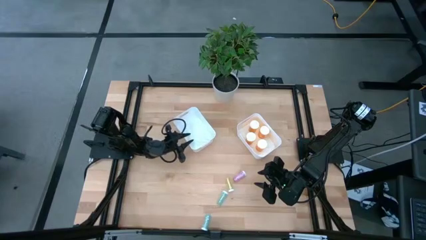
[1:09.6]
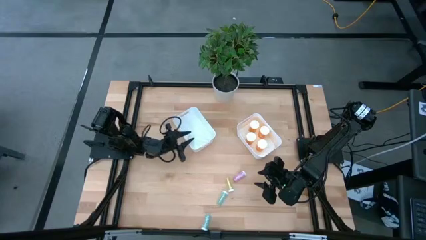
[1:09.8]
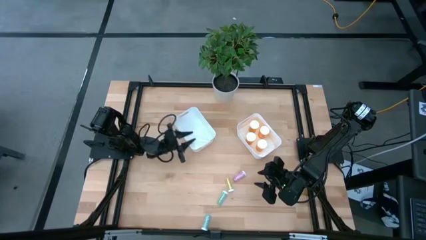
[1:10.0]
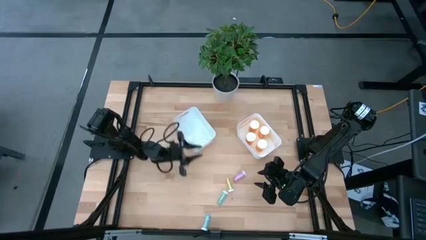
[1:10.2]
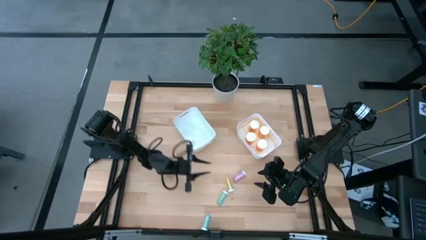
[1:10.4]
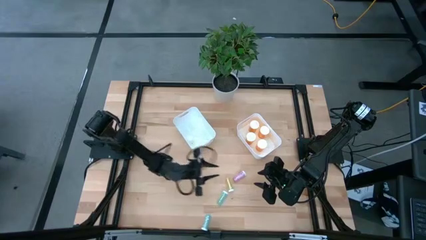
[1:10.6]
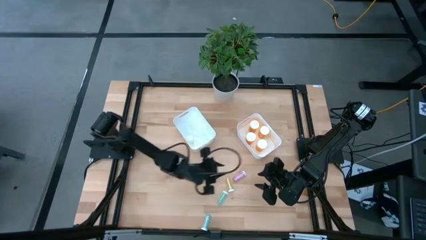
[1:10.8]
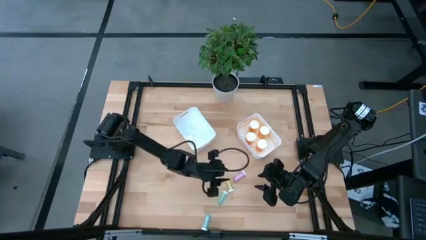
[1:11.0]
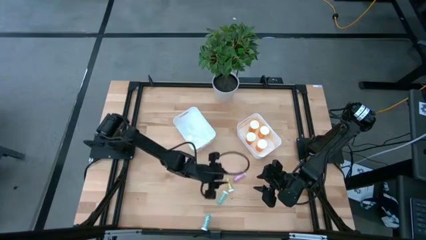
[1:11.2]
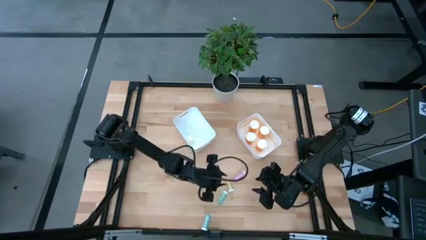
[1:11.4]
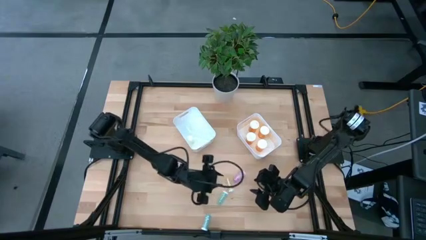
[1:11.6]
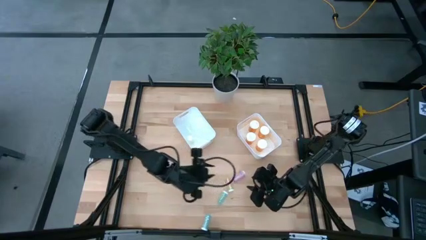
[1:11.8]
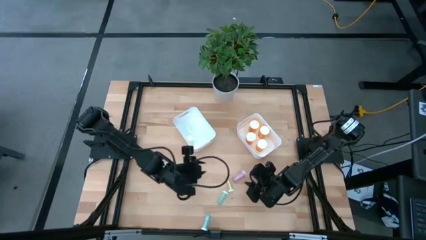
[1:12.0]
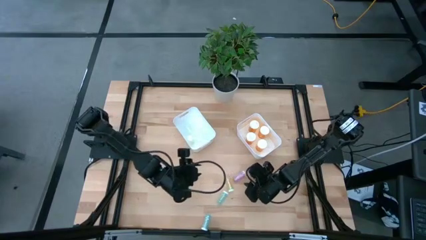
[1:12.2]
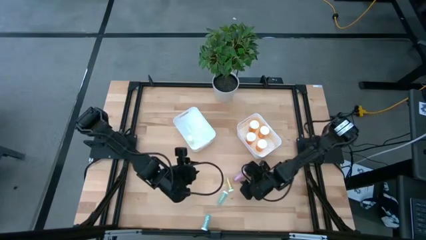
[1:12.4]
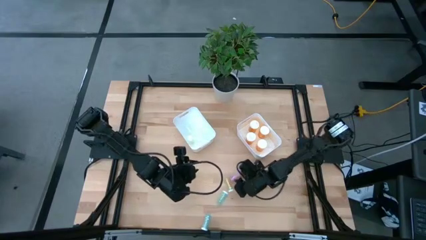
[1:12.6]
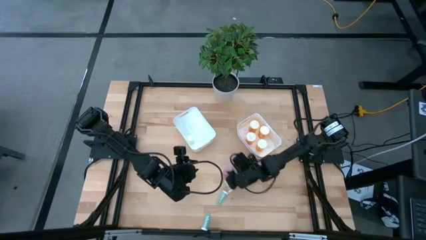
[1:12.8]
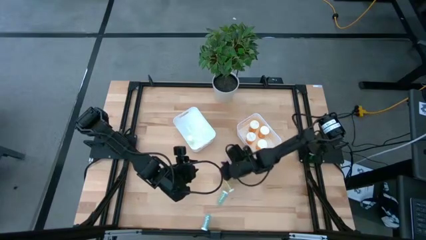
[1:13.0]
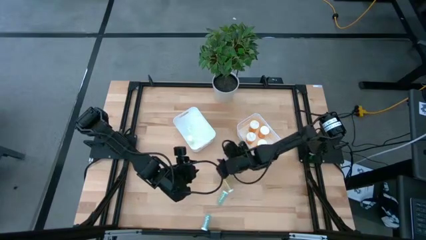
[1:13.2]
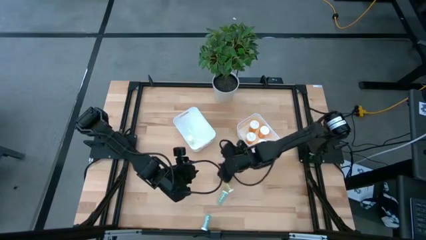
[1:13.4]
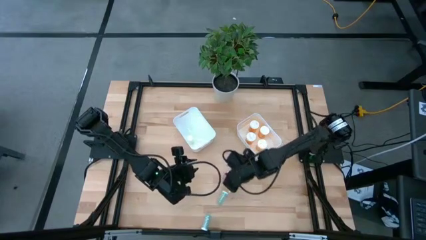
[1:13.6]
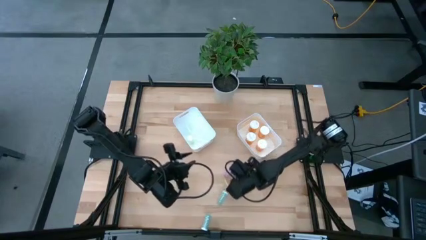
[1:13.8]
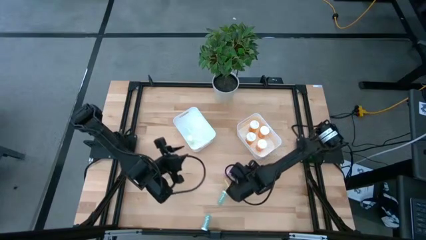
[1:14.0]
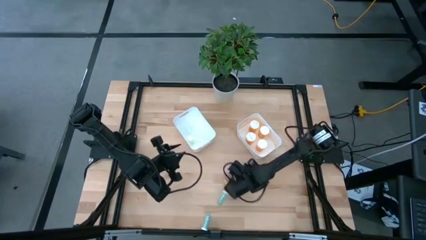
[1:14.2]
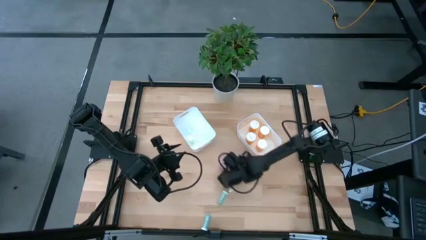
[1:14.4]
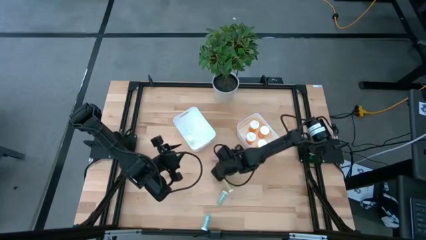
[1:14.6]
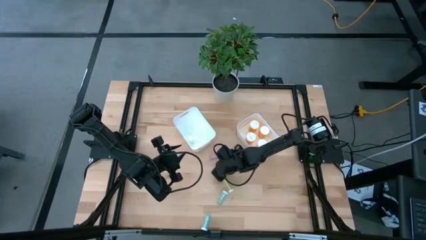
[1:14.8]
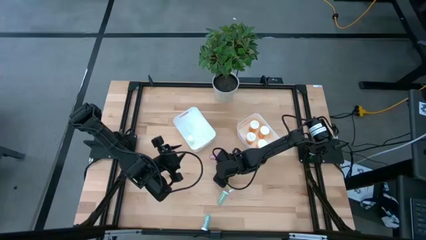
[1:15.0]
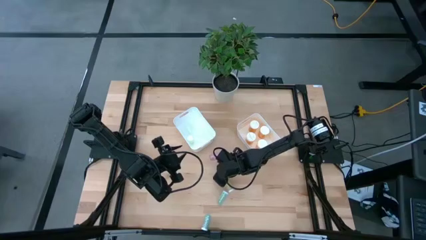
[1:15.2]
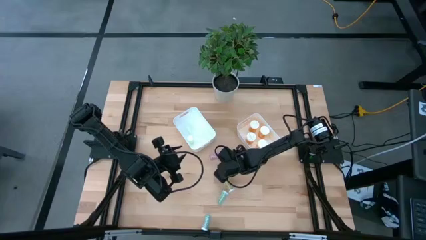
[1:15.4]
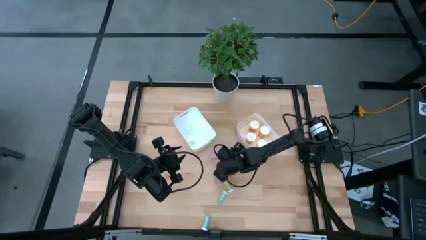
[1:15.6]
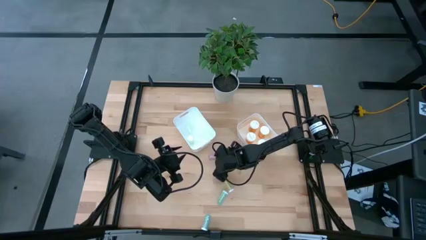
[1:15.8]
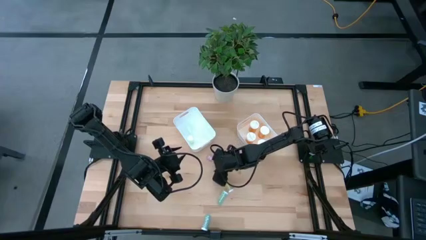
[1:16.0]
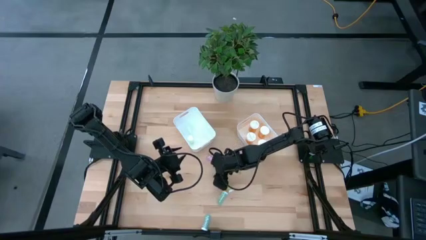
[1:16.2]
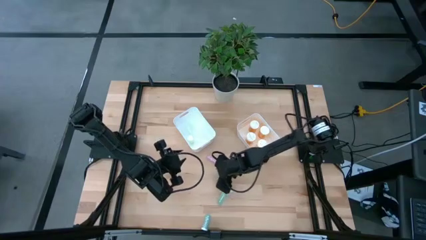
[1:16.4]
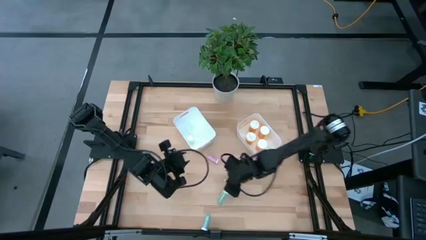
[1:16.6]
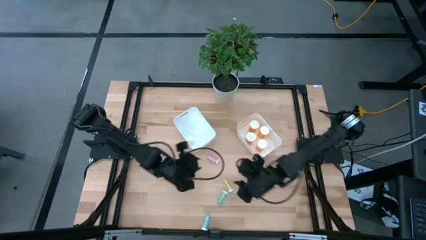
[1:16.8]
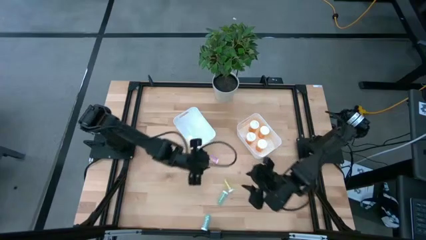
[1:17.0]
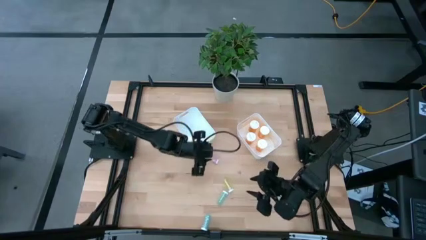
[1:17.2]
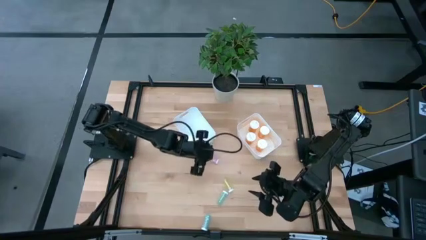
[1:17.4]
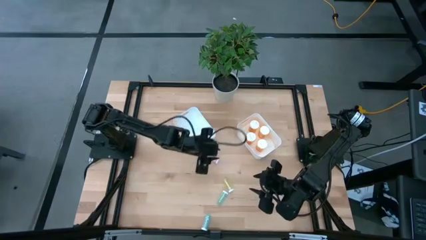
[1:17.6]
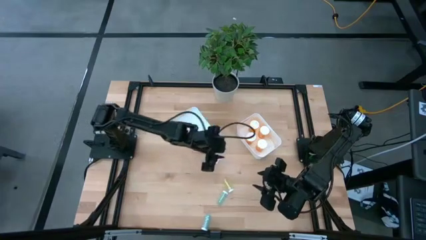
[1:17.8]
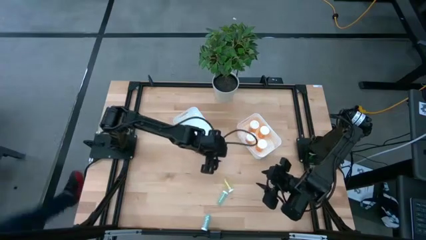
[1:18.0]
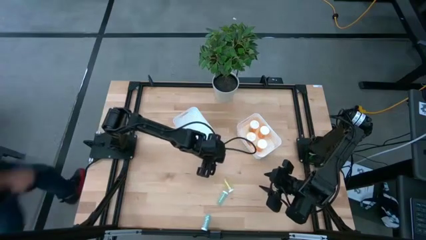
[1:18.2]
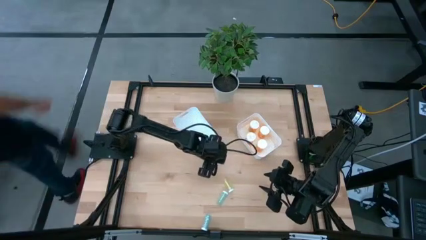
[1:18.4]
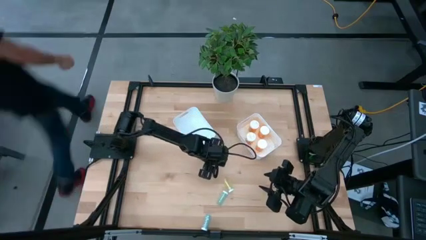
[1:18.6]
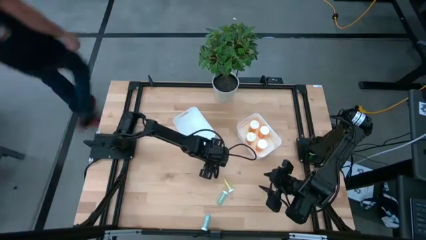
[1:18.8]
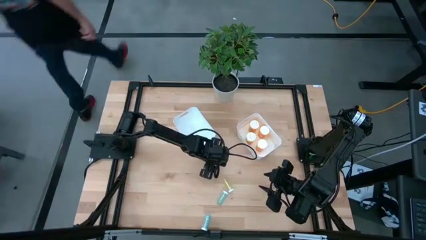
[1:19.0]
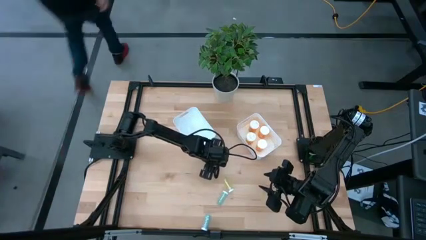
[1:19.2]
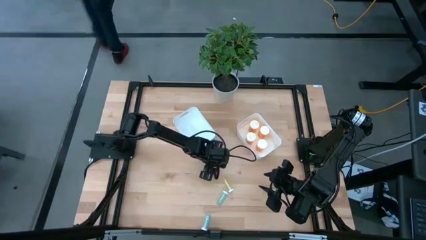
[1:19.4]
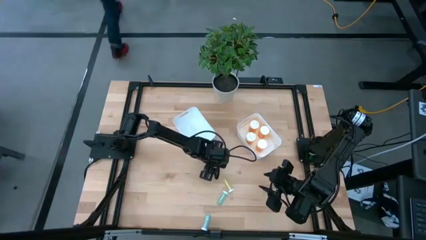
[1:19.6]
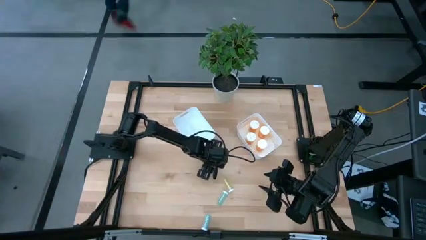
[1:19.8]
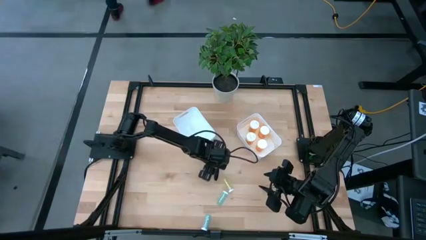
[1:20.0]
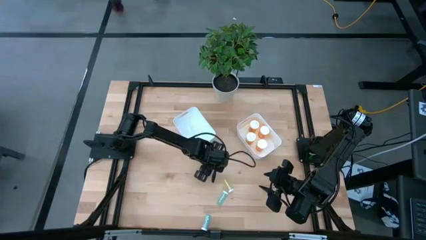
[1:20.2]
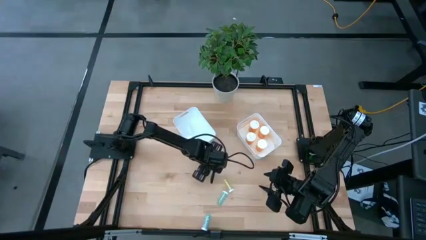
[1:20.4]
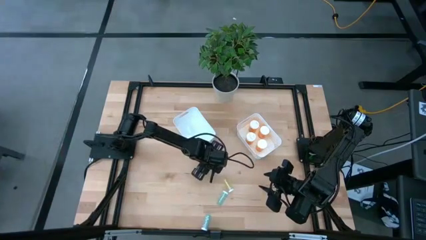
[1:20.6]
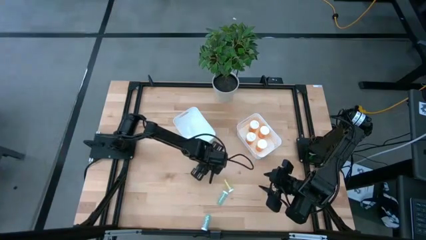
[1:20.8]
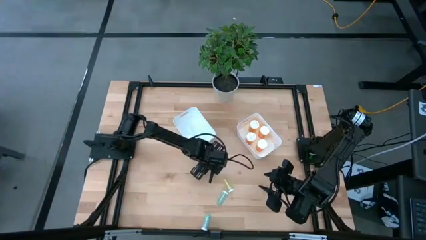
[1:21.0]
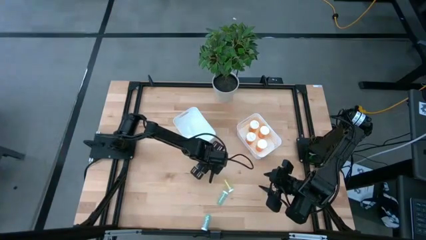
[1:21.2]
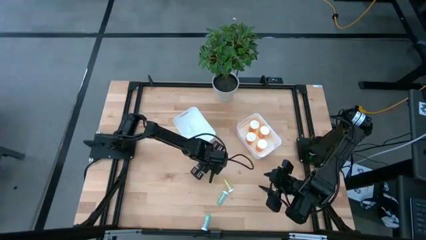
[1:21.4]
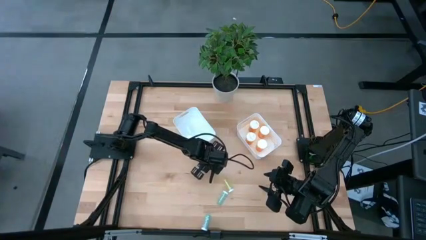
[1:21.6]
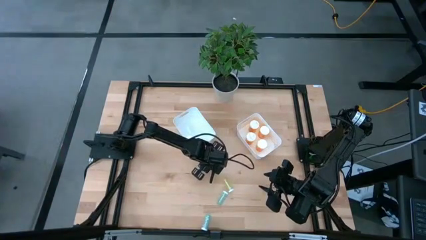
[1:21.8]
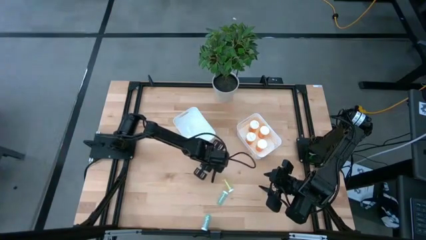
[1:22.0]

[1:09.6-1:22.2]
Task: Pick and place medicine bottles into bin by pill shape (circle, oval)
Put the pink pill bottle into the left white bin

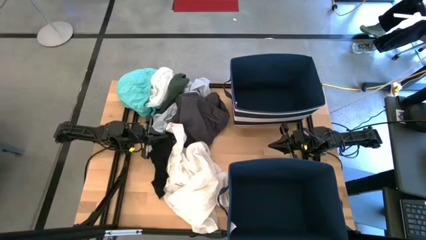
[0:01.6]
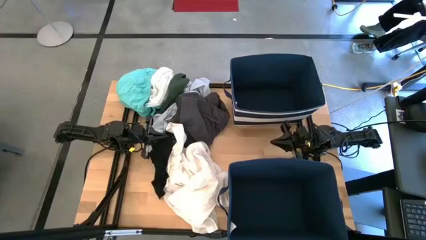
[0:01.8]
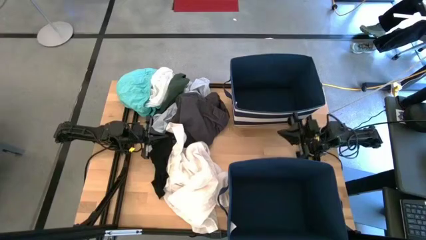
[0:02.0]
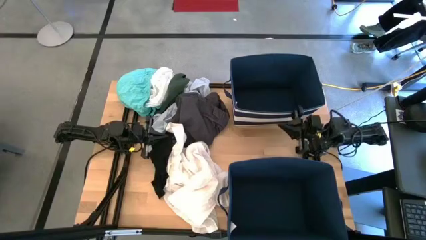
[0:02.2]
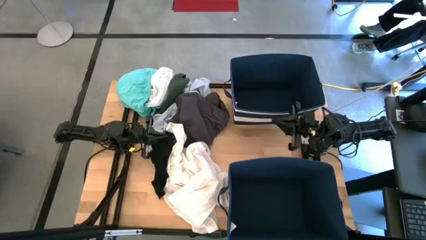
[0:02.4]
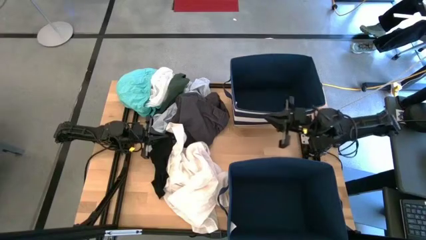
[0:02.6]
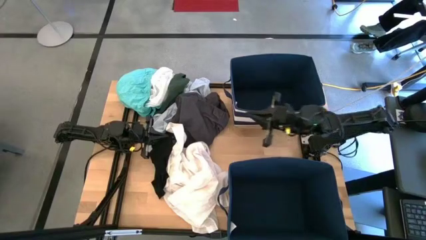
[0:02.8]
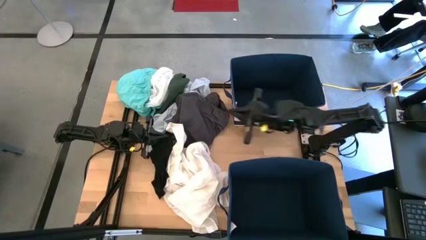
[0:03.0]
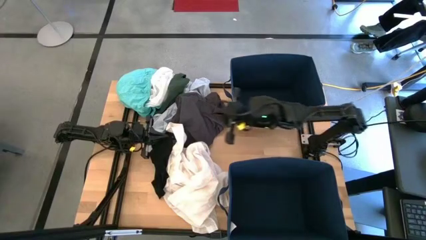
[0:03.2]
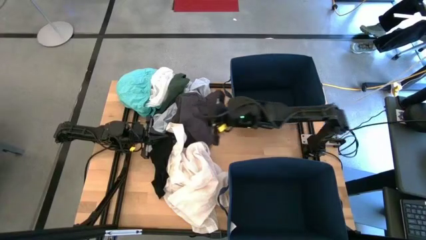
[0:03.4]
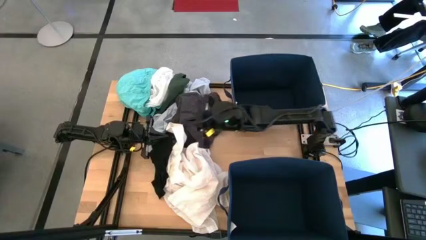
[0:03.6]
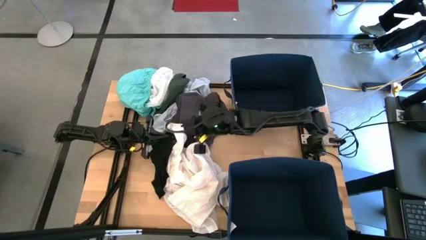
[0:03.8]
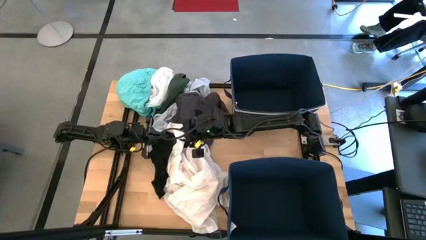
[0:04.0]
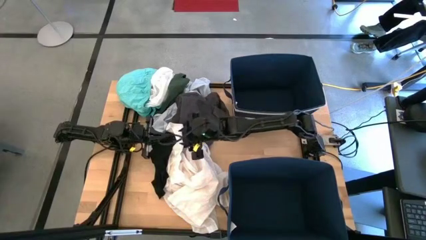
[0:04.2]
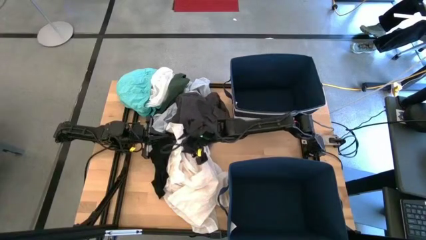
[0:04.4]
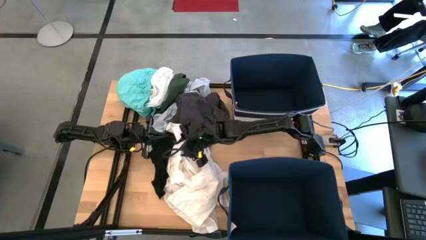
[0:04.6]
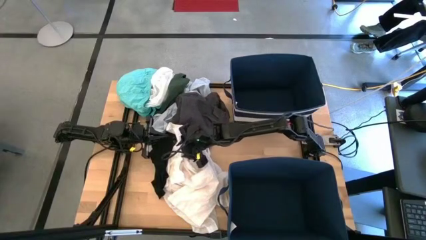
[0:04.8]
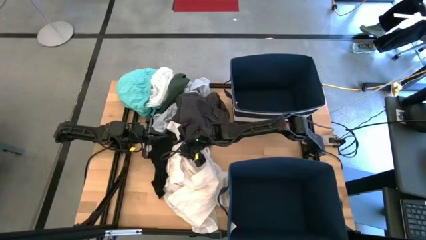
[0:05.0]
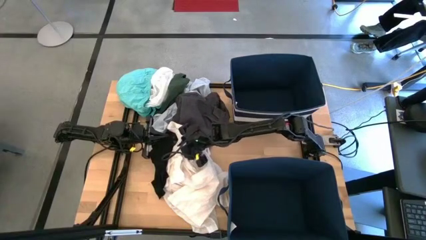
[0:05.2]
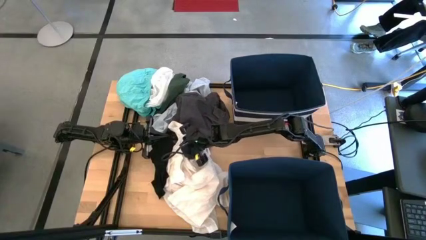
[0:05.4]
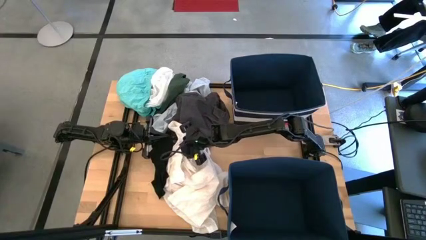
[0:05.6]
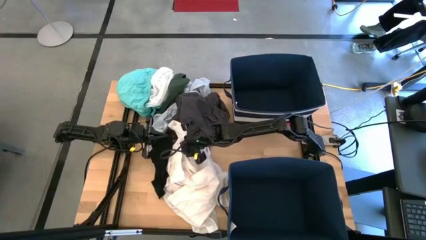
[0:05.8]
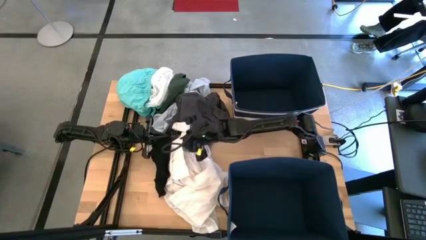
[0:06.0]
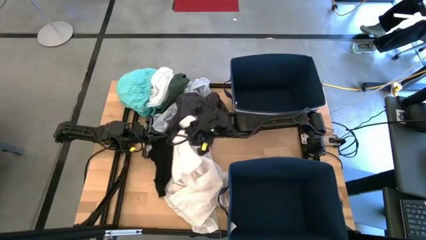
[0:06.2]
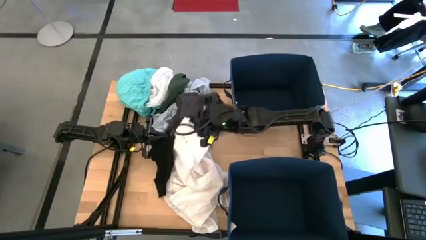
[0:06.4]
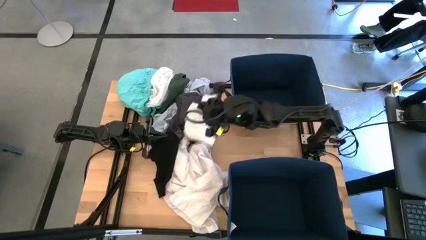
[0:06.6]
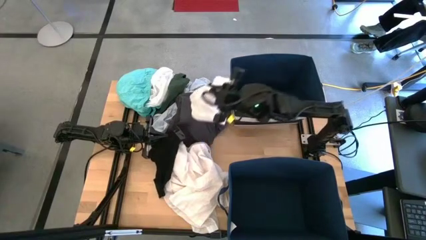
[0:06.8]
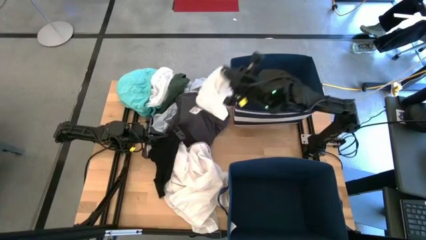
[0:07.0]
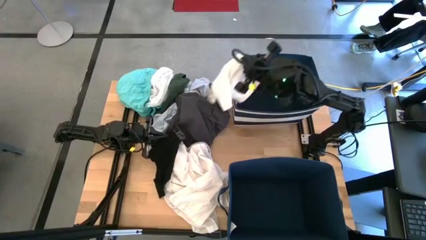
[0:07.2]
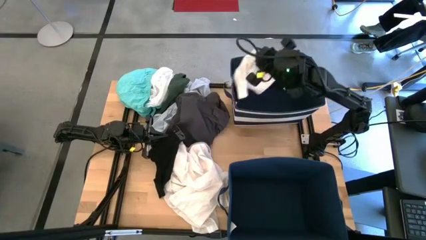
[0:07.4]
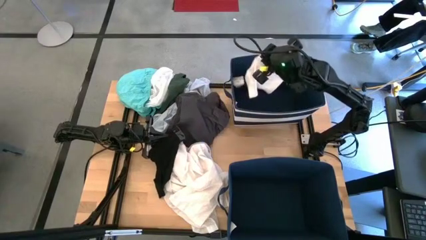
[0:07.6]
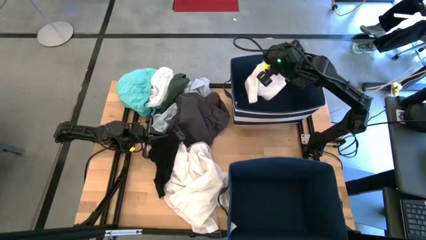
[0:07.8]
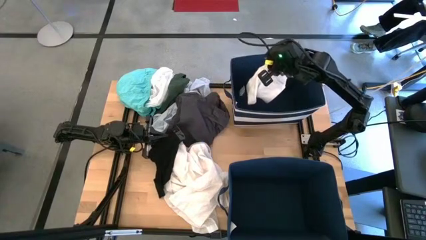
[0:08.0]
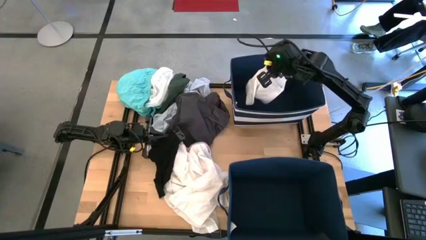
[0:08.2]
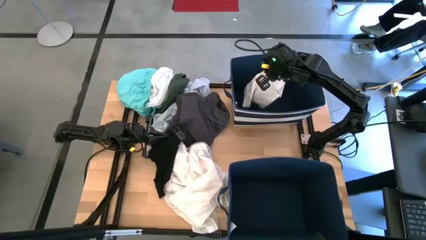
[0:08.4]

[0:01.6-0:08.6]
Task: Sort clothes
Put the white boxer into the top blue laundry organizer
